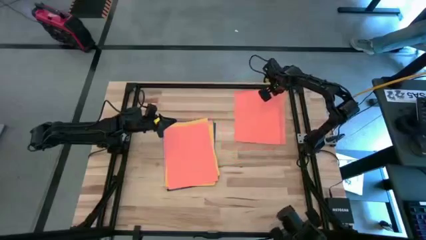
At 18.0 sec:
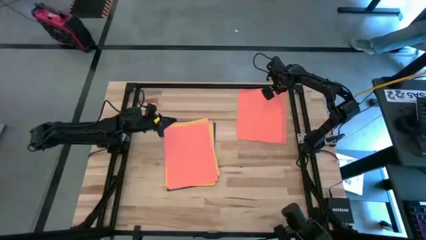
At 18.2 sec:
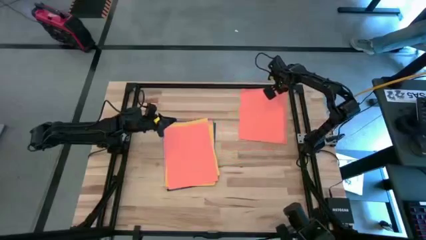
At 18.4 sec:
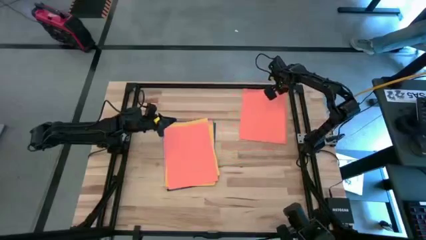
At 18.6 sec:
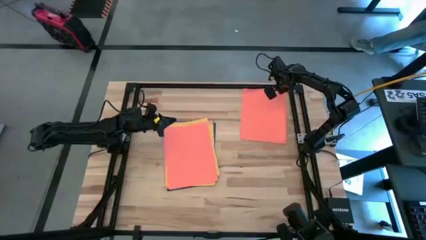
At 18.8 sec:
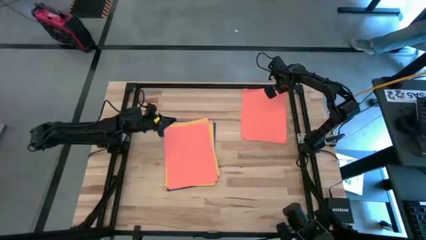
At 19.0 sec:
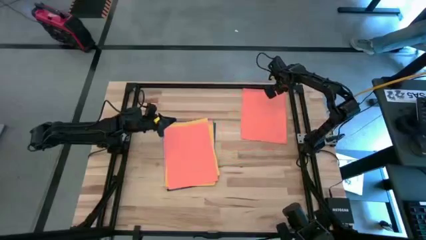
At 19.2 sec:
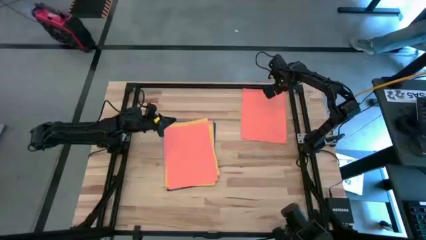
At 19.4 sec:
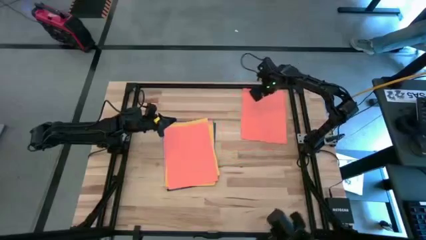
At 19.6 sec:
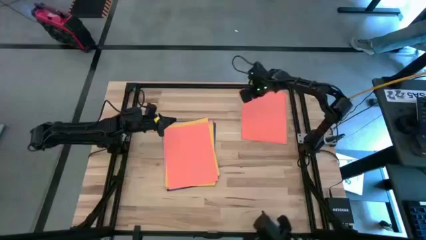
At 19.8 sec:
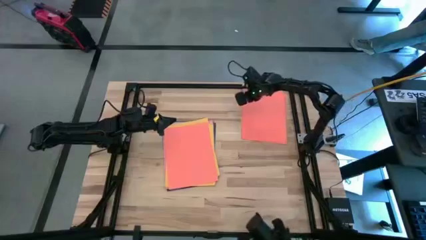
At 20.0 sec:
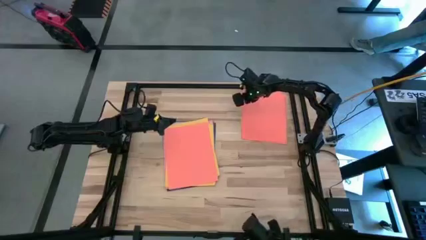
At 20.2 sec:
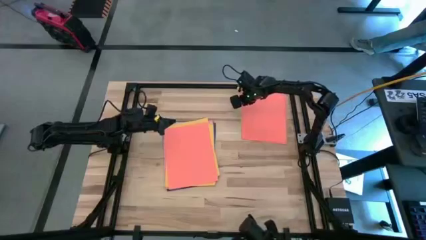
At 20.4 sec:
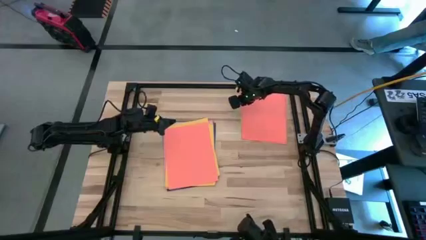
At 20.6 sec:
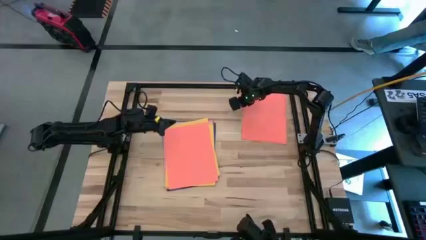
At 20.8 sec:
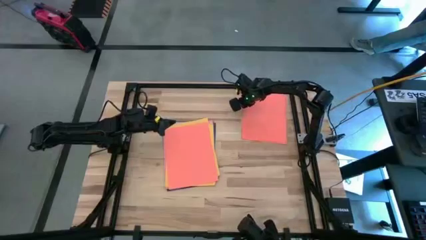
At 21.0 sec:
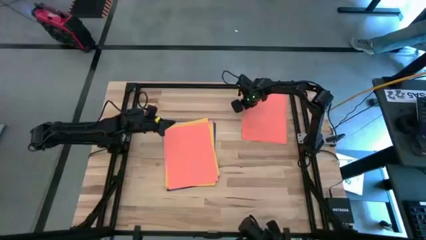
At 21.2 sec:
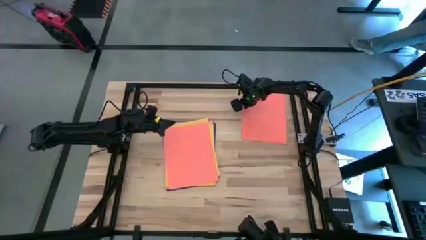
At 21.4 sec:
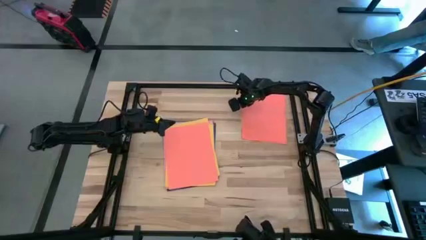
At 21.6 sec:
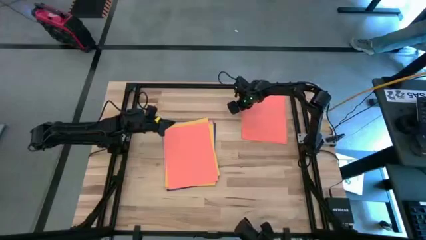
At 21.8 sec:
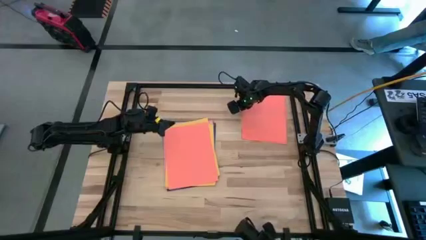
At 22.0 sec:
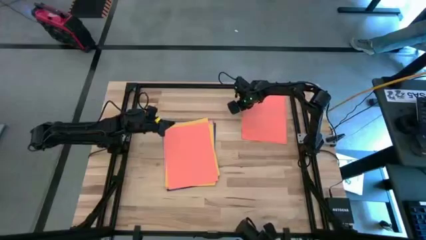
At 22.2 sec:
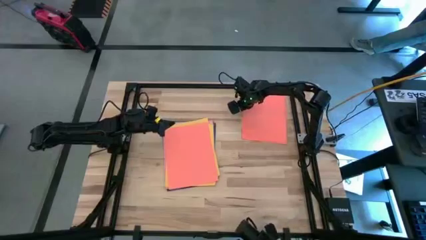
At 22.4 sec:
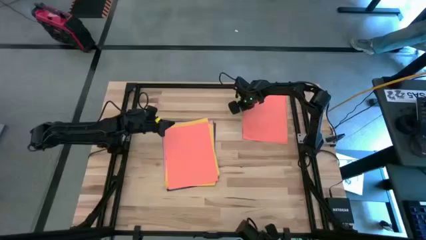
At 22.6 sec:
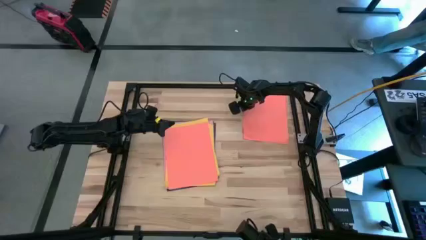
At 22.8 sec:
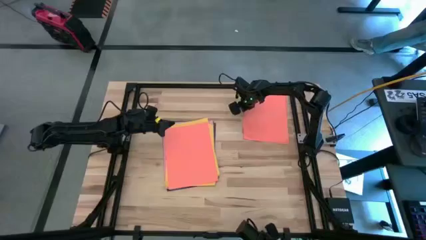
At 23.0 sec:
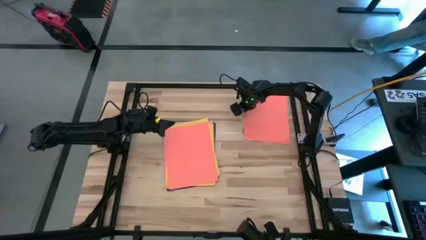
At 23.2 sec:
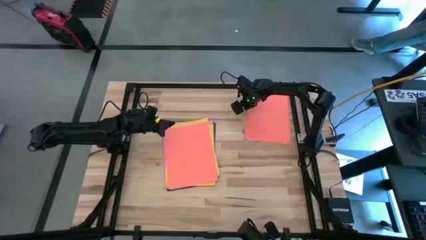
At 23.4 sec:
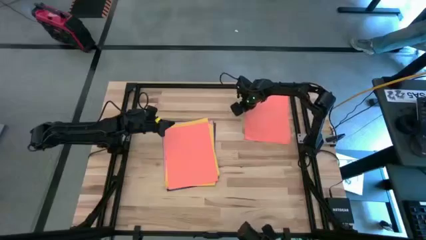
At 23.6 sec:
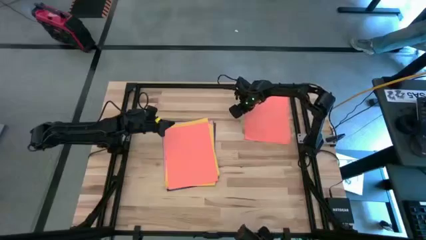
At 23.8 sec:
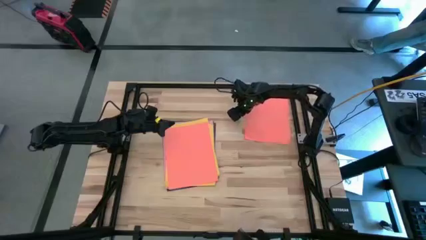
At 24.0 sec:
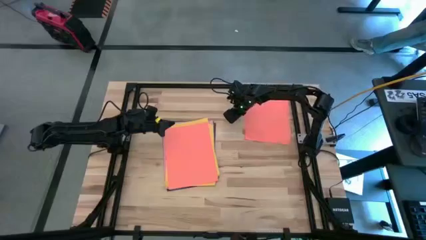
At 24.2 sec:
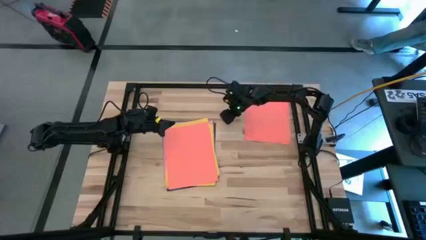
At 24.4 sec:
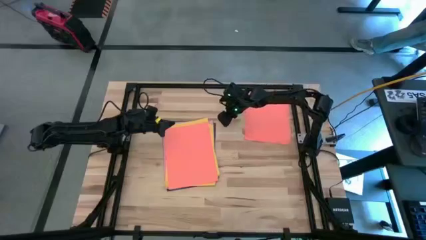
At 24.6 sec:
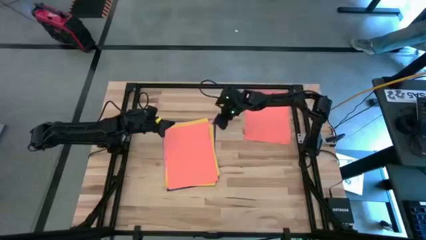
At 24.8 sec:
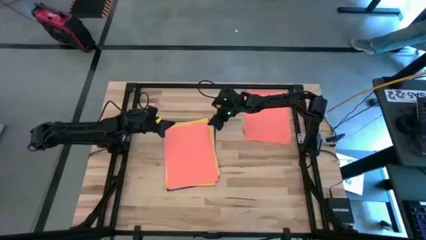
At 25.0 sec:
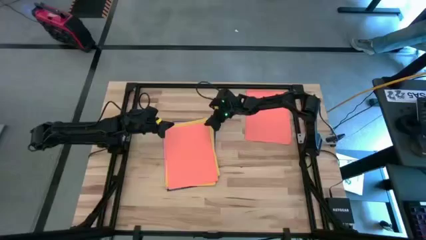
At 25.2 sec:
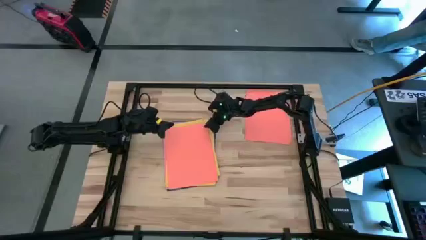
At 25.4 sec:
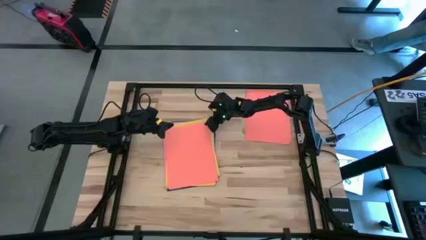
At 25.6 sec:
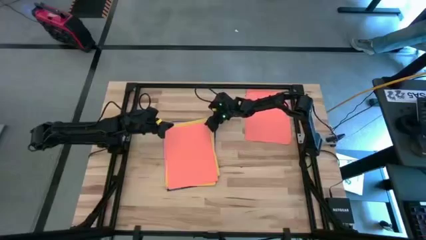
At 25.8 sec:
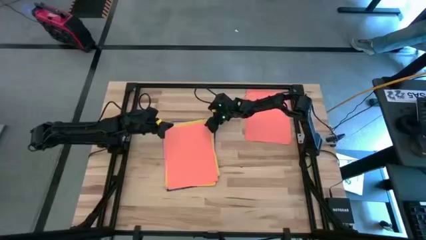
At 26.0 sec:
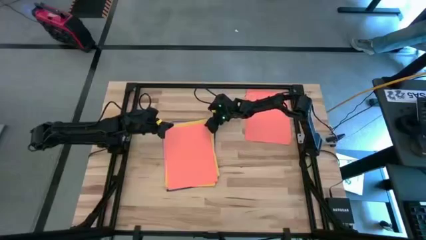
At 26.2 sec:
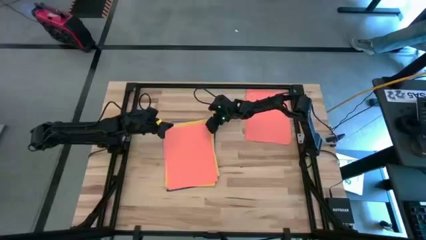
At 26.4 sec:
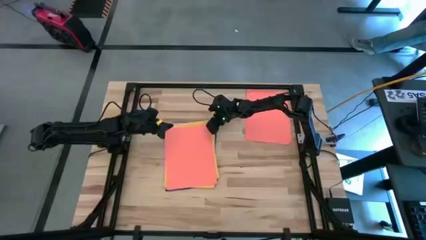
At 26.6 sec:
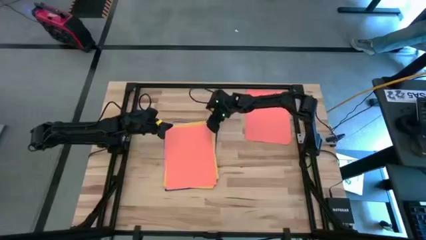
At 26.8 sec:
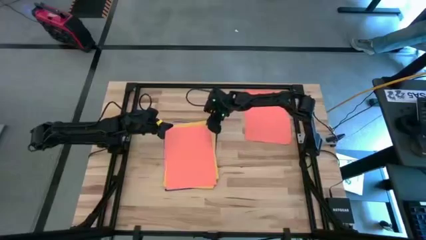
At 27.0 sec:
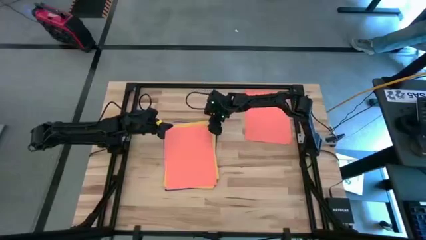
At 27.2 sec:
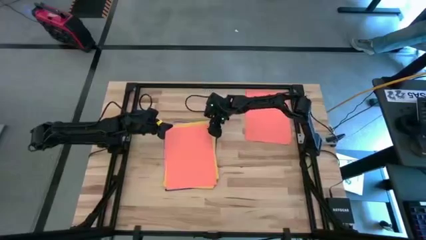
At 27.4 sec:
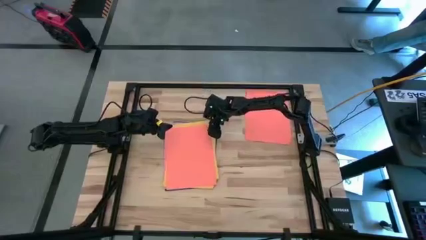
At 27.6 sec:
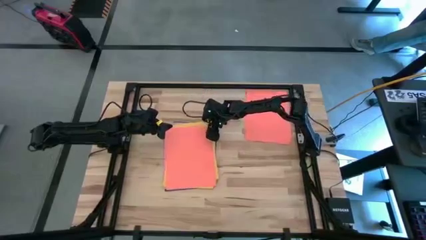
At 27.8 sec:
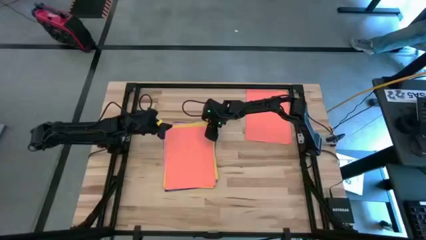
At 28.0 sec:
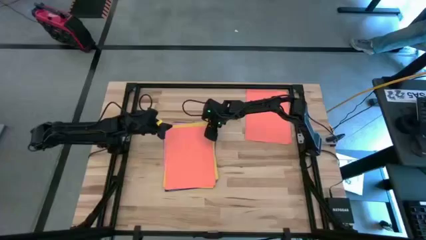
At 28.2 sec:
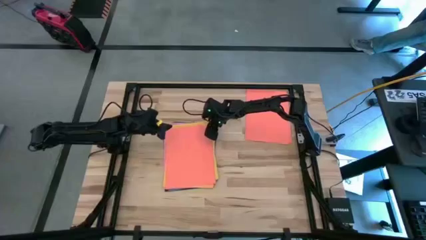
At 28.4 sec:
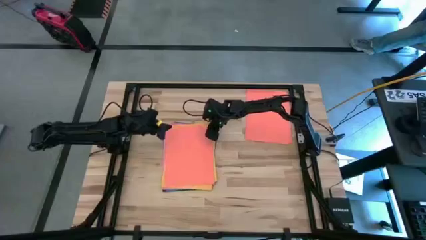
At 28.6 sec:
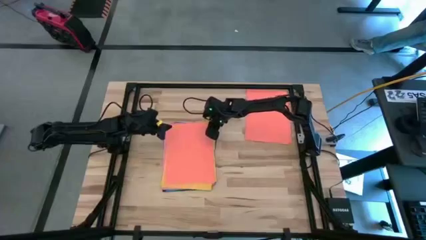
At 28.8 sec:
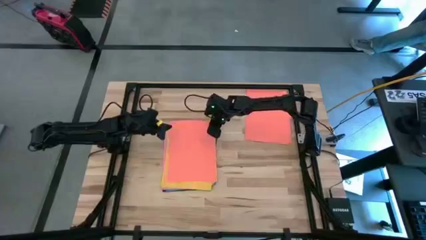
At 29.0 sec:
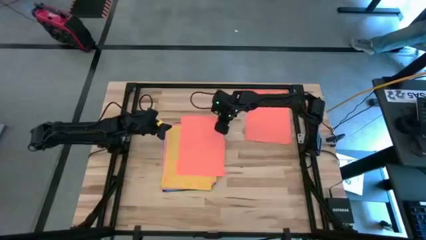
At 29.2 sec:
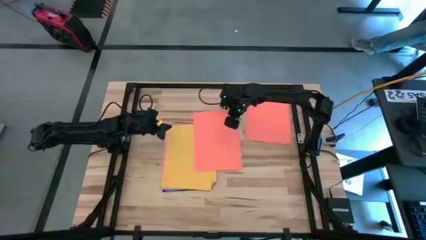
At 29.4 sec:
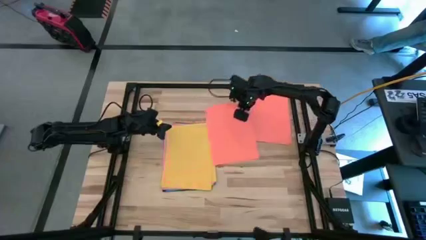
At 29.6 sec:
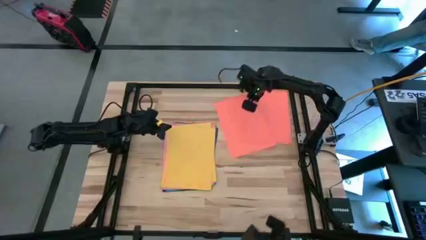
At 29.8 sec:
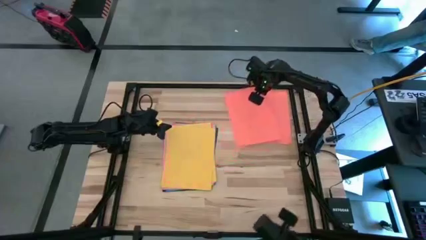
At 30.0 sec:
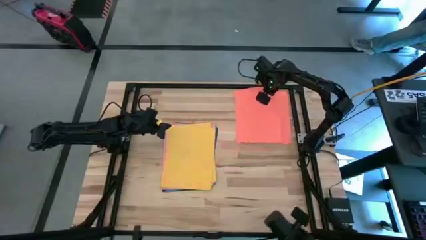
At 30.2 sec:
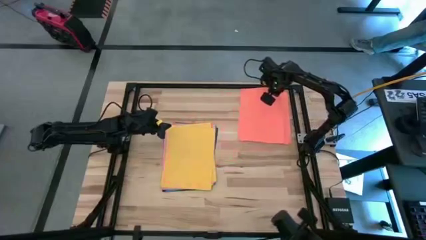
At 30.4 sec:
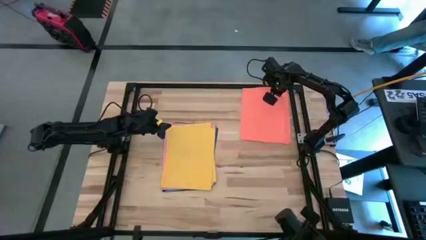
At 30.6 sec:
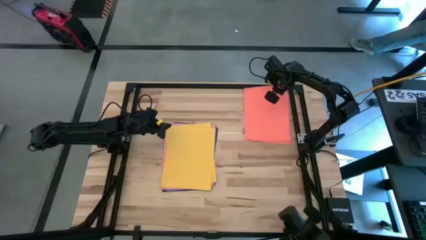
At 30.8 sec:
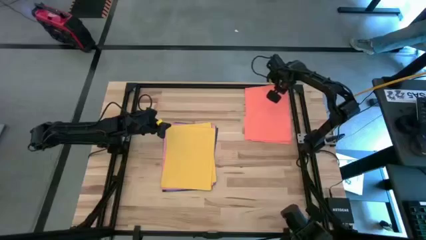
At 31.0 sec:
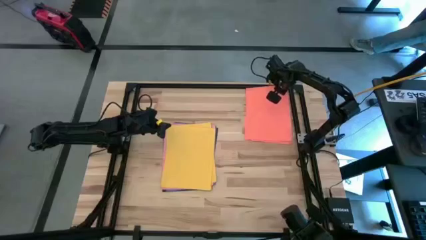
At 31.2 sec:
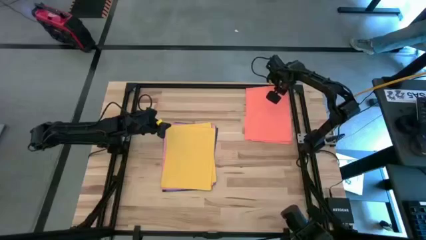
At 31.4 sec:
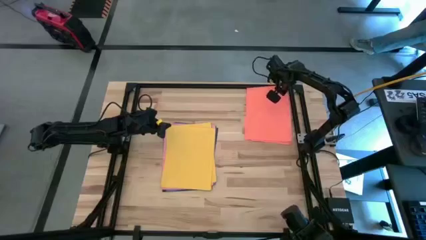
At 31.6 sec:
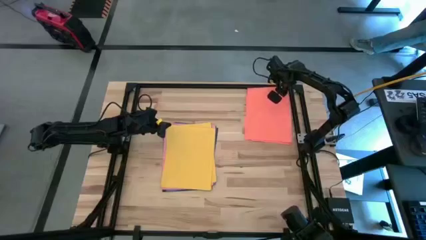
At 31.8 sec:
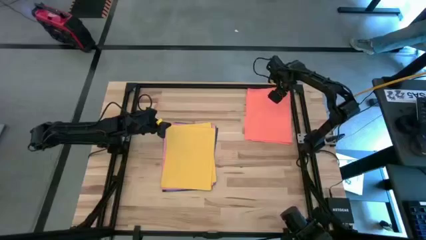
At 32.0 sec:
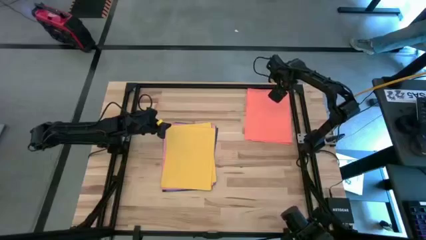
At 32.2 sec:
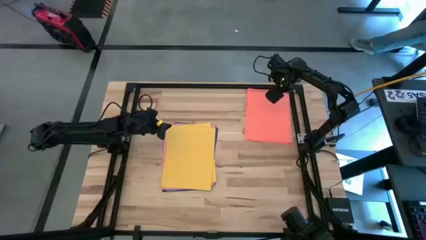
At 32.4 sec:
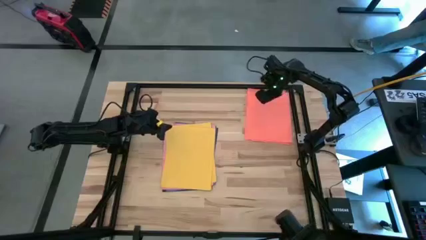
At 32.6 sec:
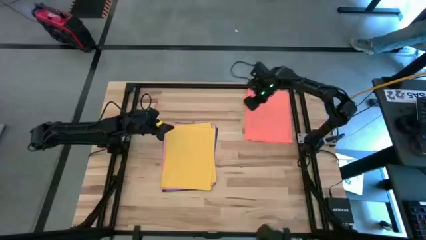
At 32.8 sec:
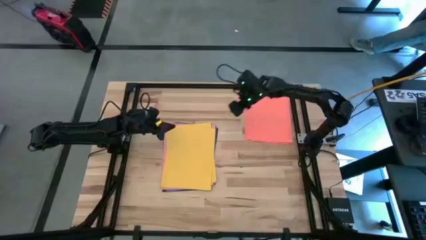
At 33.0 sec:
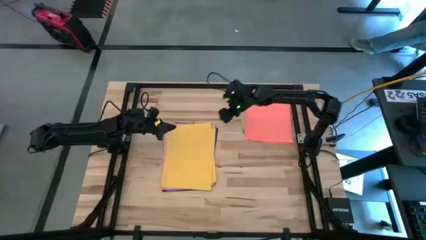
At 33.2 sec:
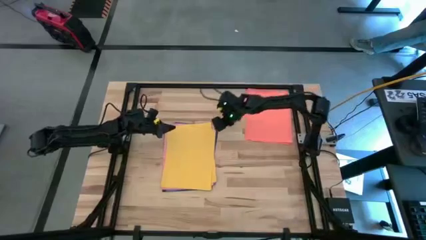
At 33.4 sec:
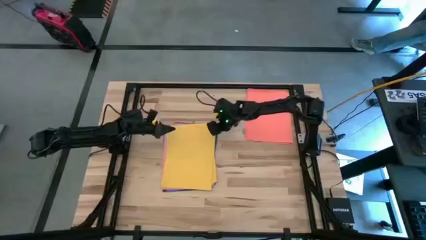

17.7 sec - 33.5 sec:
Task: Organize paper
Put all of the orange paper at the top right of the table
